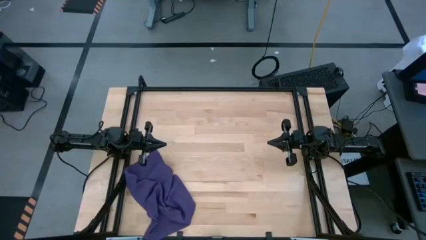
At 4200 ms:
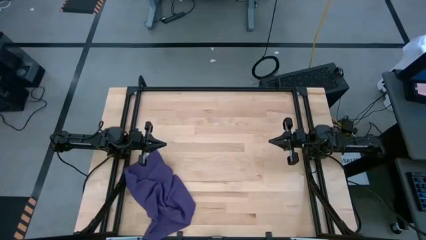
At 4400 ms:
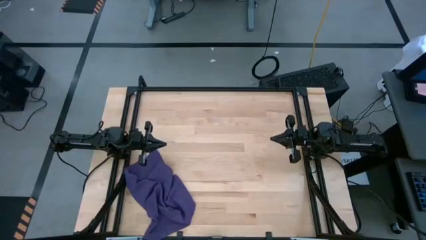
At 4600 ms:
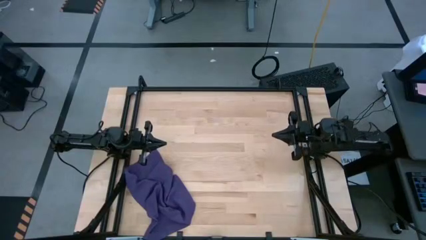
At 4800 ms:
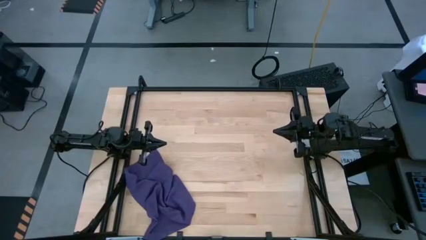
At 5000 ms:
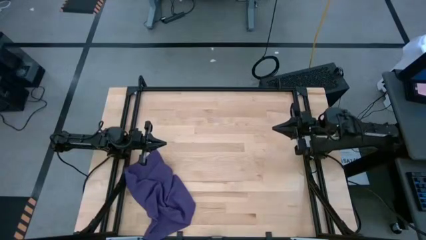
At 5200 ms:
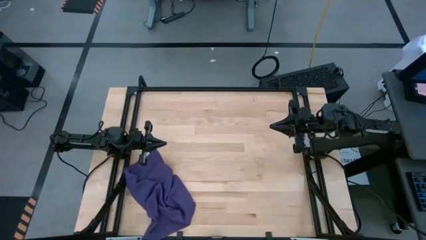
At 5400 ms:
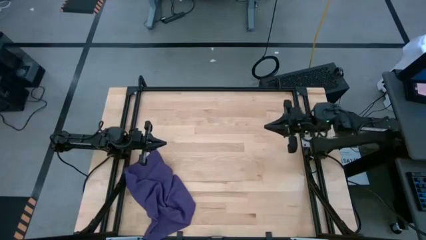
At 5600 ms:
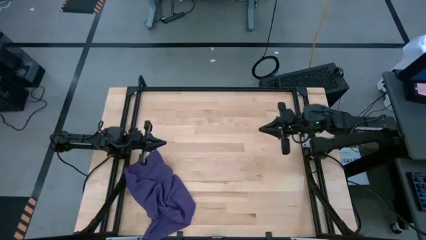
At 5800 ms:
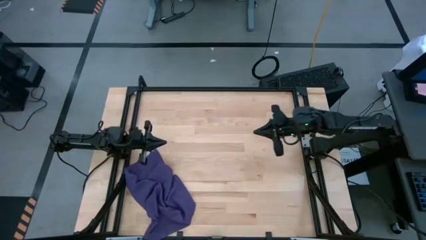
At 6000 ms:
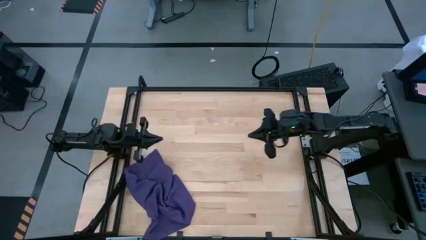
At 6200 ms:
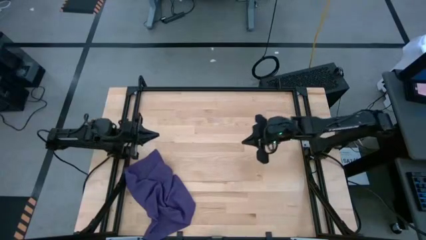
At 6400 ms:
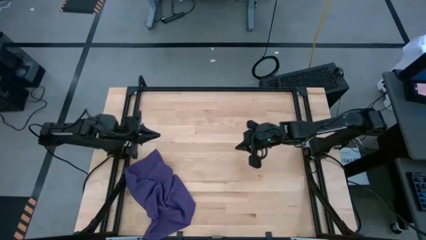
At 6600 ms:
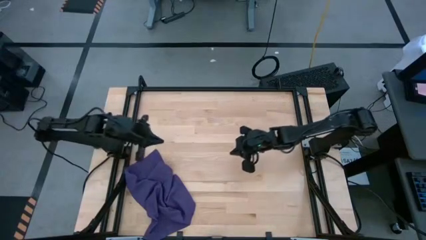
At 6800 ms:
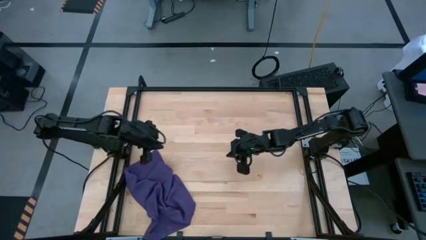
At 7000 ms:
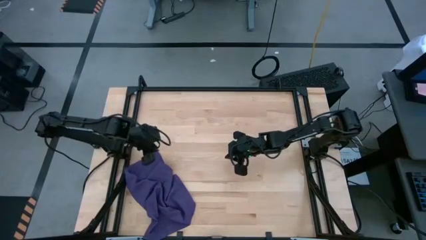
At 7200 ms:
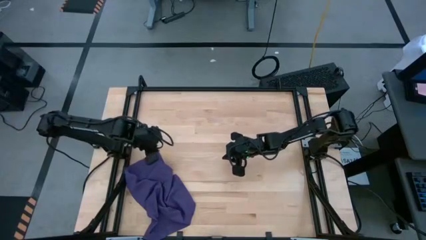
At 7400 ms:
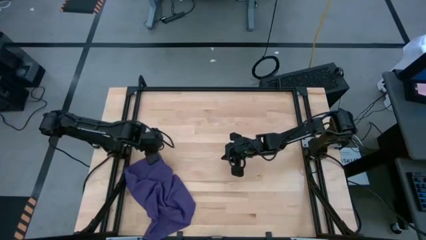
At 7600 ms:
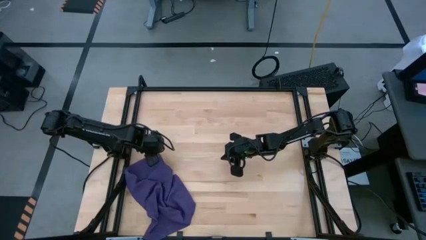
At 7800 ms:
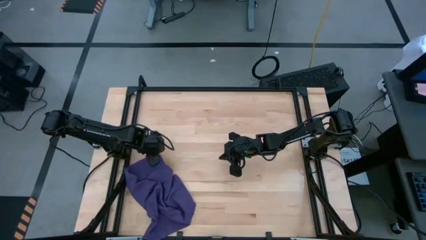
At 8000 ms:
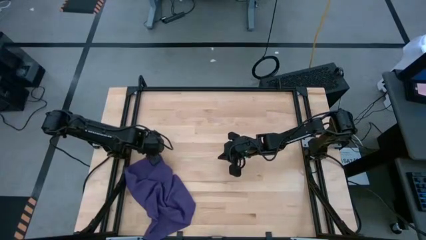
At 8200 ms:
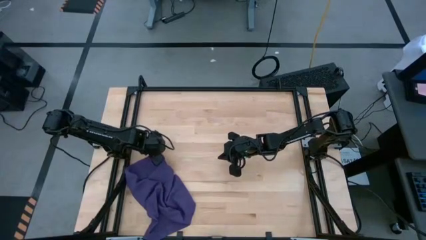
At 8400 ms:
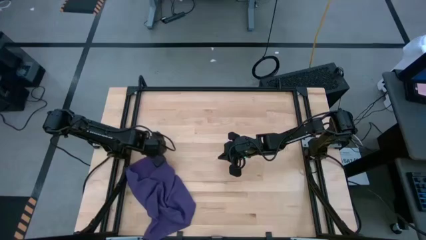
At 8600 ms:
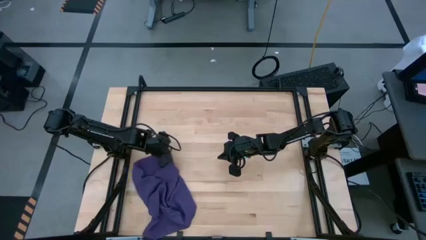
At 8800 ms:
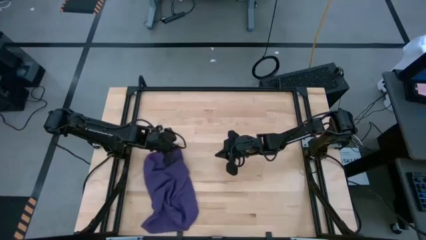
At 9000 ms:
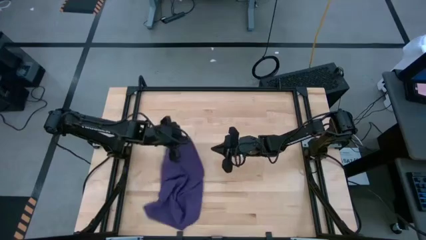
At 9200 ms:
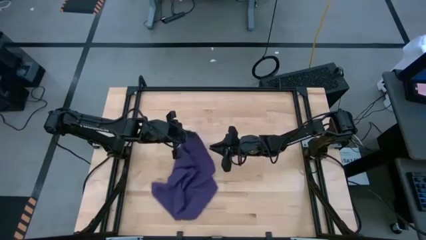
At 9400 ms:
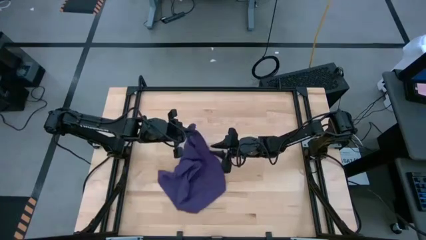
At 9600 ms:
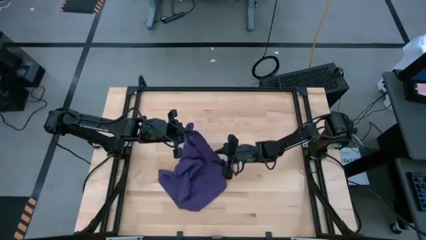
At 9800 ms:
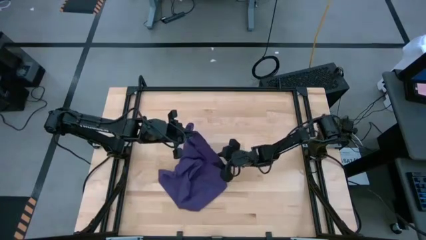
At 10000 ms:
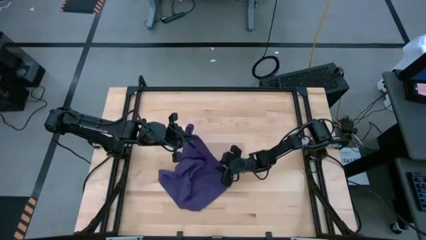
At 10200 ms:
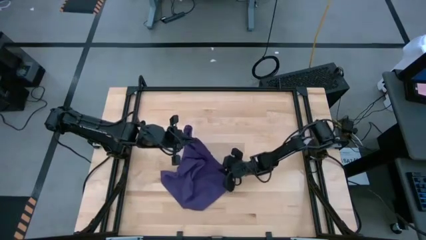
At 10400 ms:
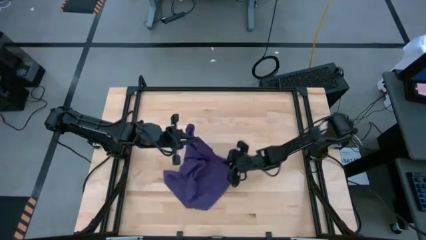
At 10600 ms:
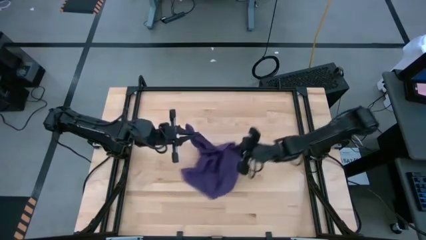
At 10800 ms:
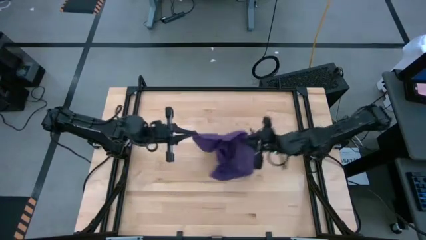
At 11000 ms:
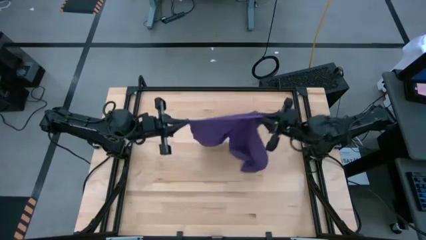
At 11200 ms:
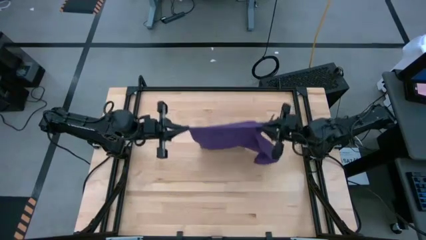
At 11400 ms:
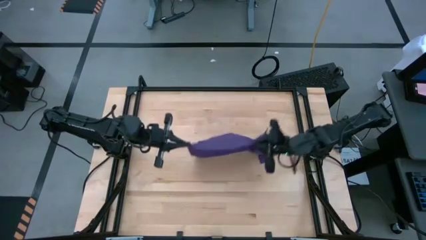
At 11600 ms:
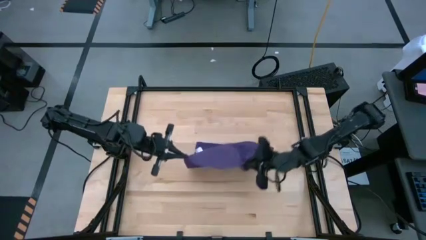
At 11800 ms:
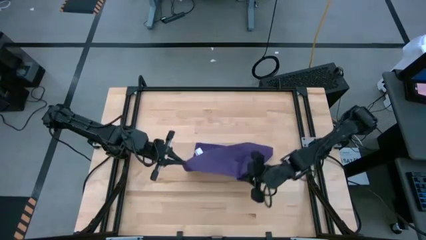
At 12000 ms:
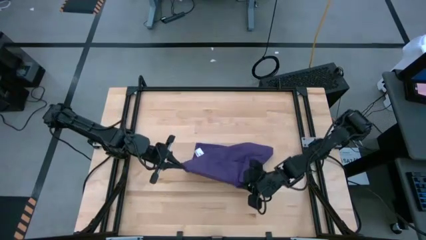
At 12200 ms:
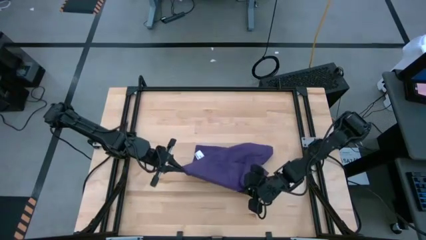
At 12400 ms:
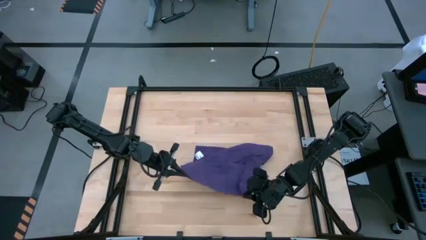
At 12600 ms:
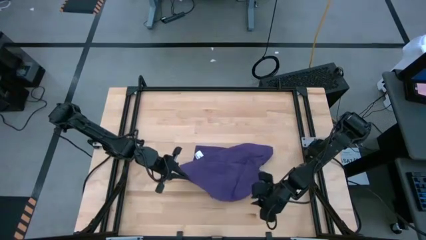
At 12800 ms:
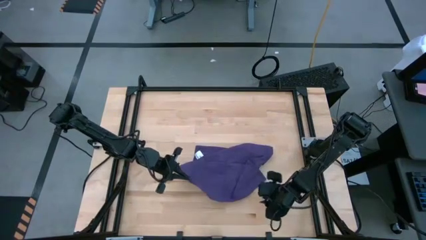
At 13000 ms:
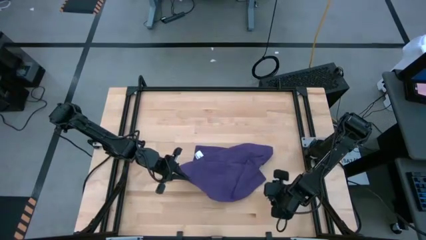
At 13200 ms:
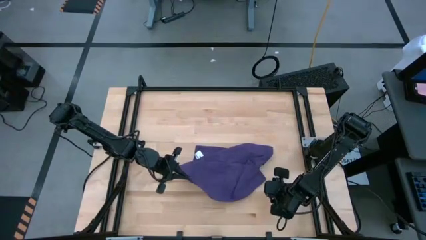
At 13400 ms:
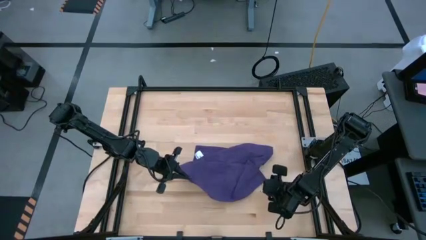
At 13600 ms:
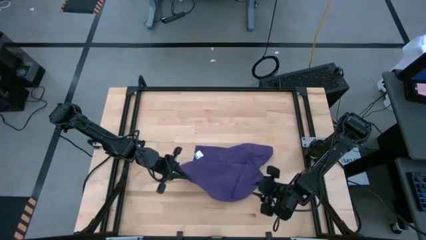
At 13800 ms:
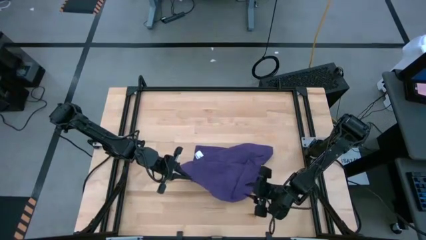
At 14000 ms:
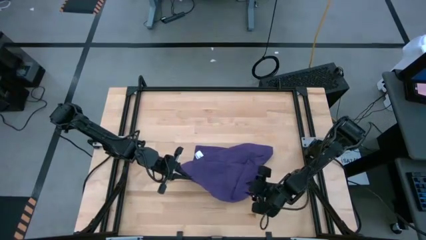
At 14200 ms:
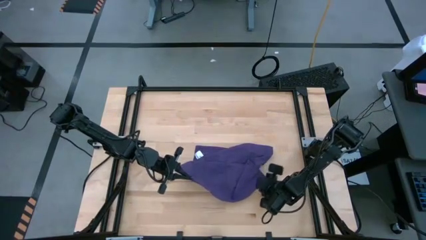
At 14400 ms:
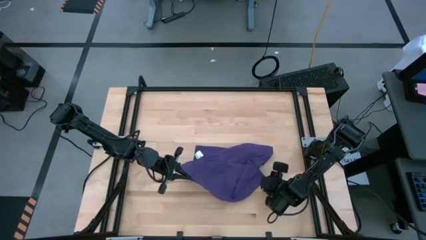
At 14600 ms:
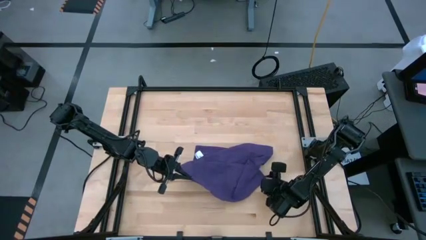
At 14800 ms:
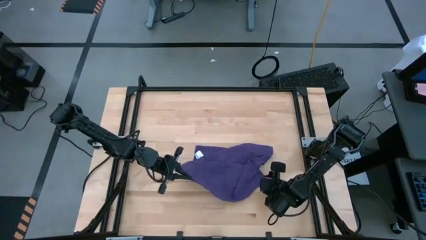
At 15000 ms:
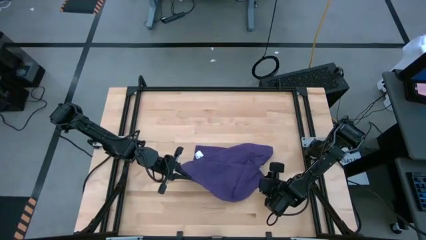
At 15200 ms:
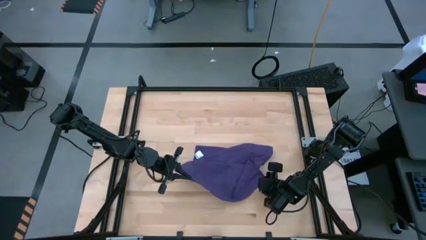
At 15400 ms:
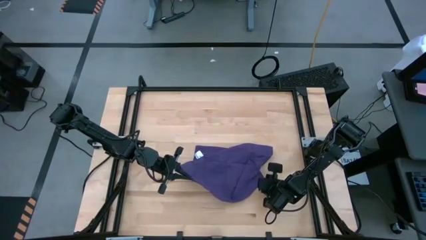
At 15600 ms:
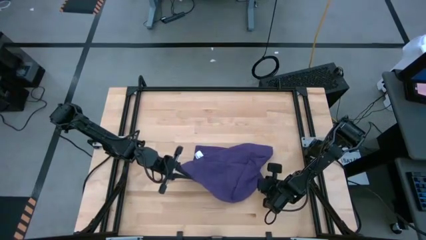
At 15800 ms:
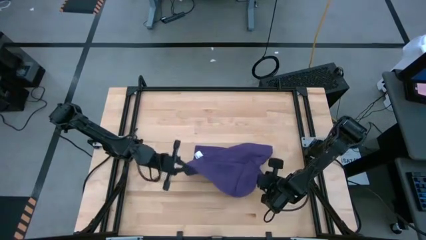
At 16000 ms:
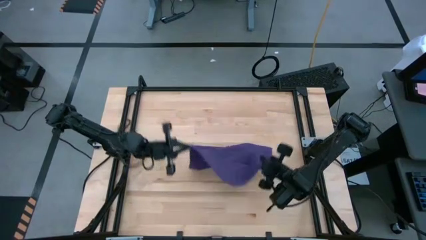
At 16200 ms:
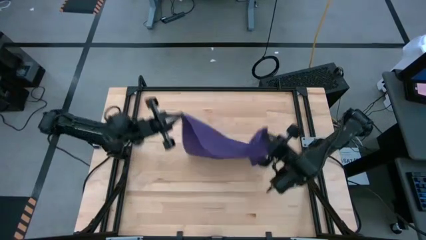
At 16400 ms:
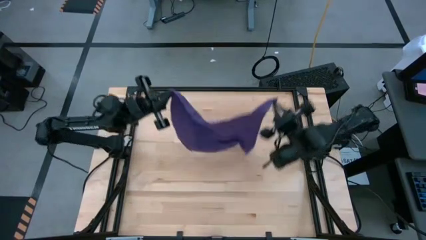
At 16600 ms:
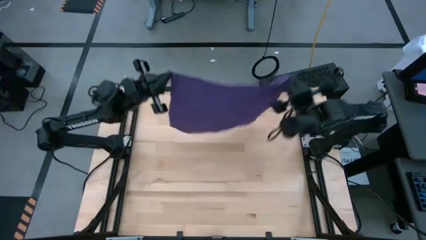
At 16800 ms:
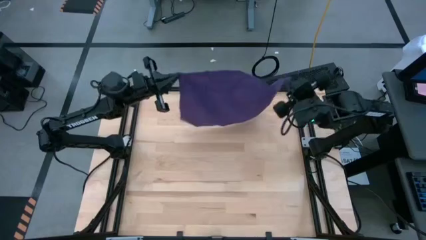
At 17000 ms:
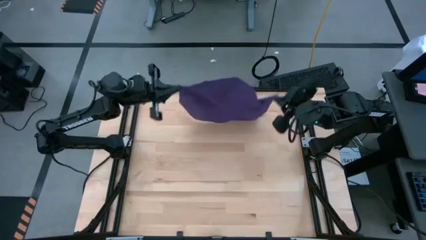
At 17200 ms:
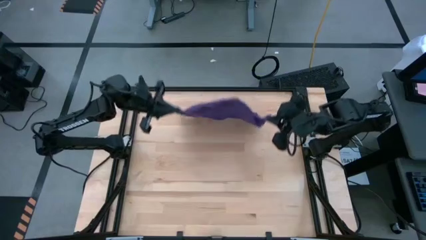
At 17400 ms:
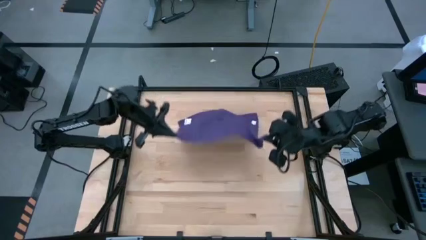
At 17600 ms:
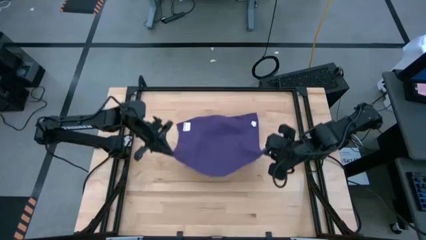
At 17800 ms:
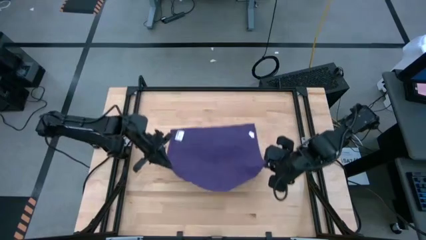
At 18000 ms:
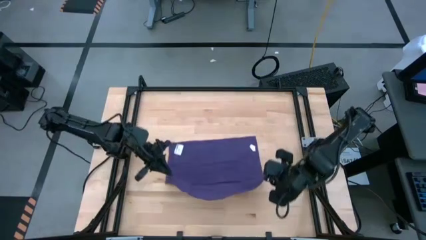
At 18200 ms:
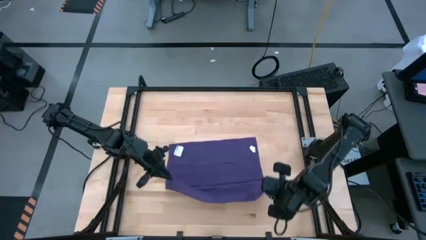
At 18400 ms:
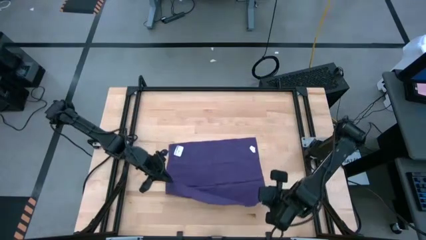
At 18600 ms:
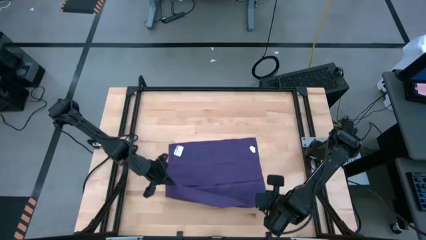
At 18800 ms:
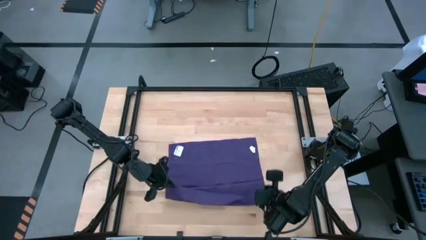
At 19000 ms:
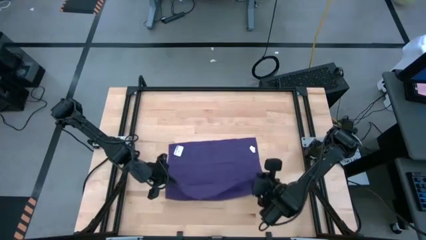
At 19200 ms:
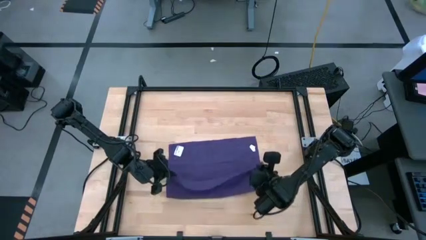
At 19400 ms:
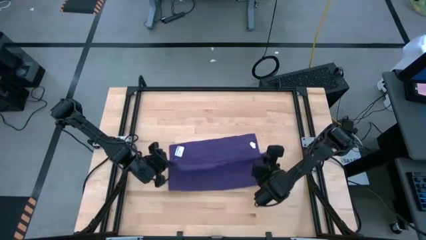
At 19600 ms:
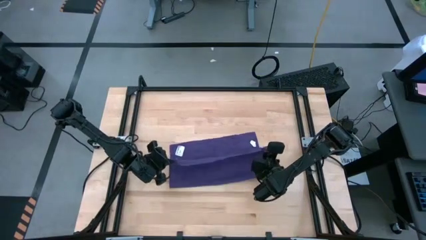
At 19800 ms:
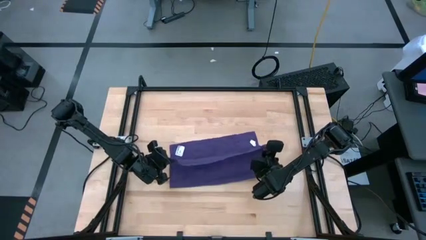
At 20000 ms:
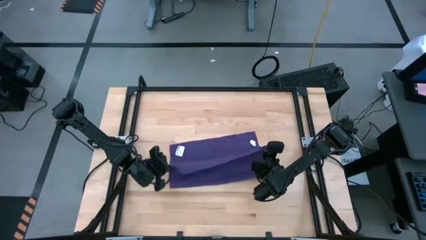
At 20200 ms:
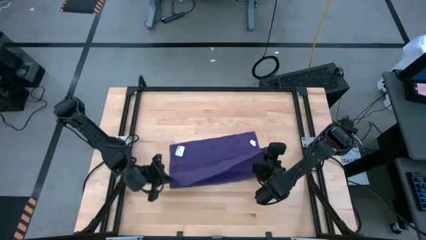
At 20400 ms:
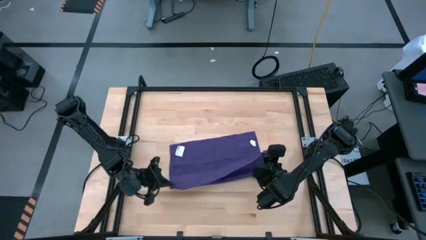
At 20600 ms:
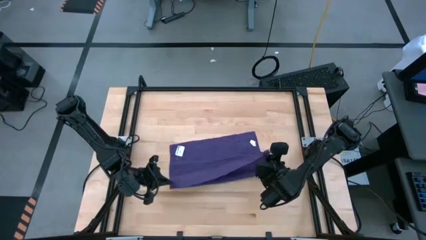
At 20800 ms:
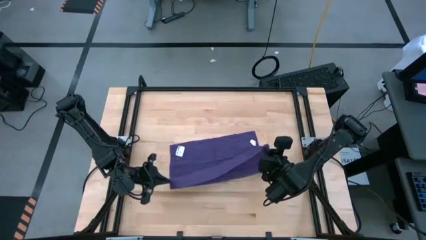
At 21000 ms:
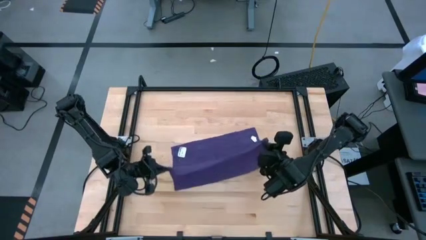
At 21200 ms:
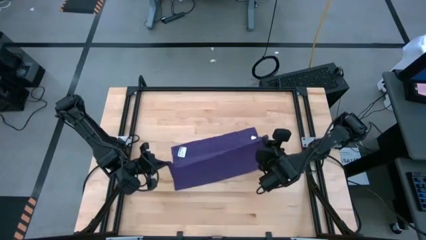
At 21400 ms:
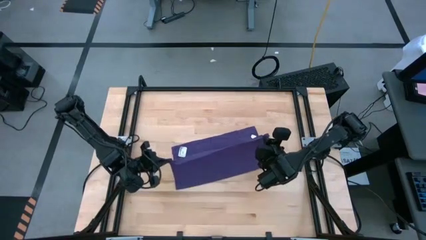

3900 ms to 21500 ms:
Task: Roll towel
Roll the purple towel
